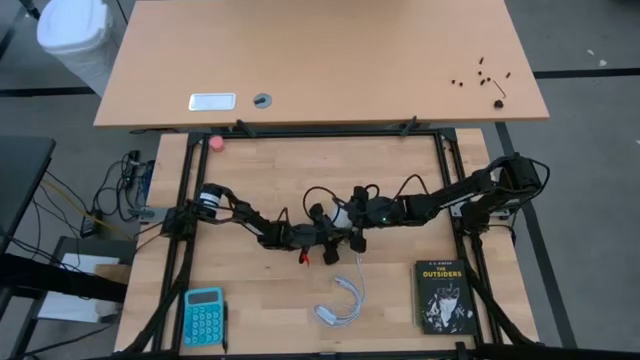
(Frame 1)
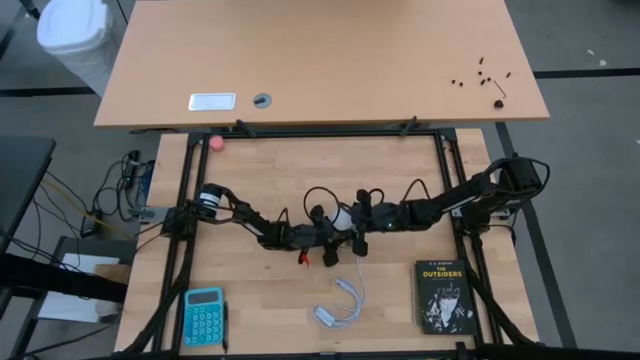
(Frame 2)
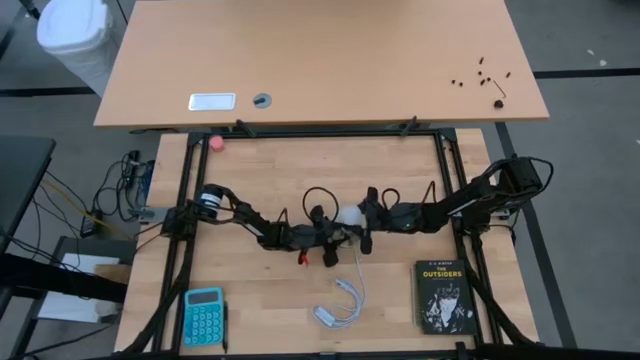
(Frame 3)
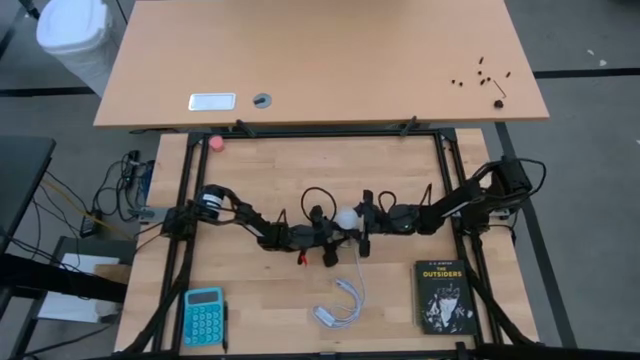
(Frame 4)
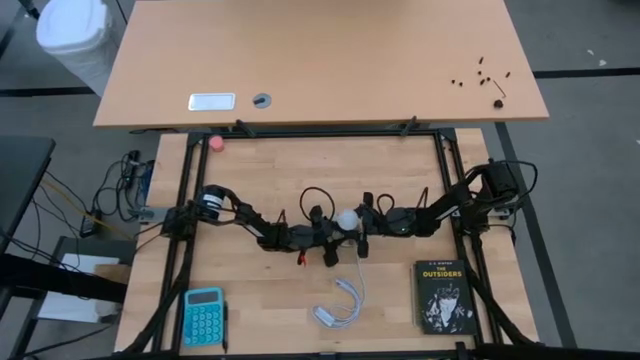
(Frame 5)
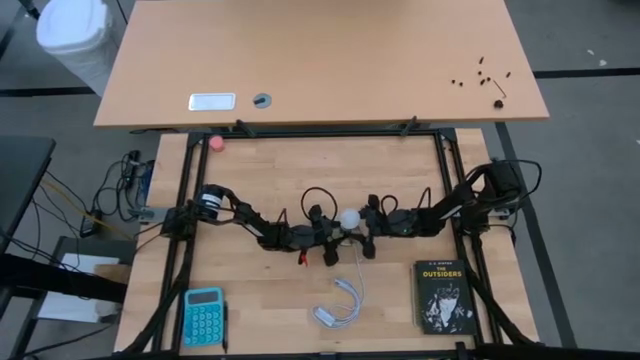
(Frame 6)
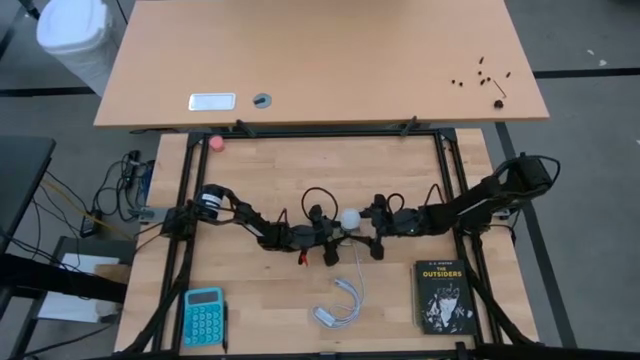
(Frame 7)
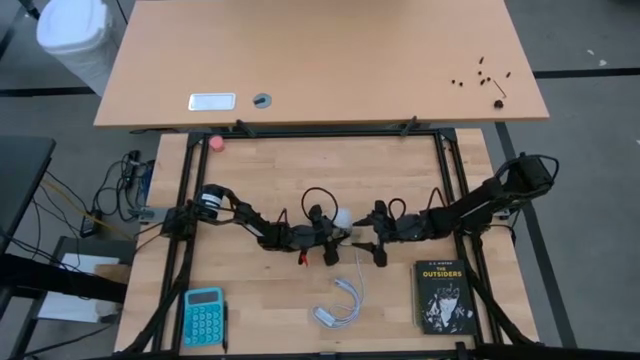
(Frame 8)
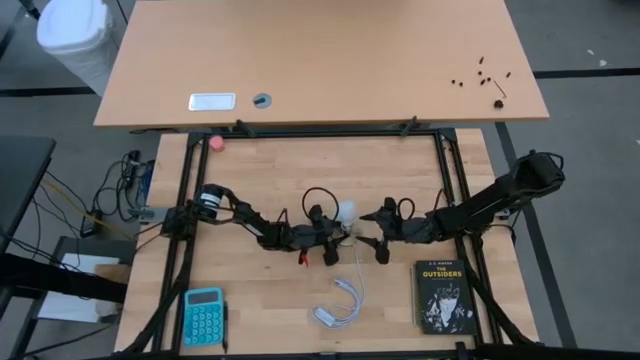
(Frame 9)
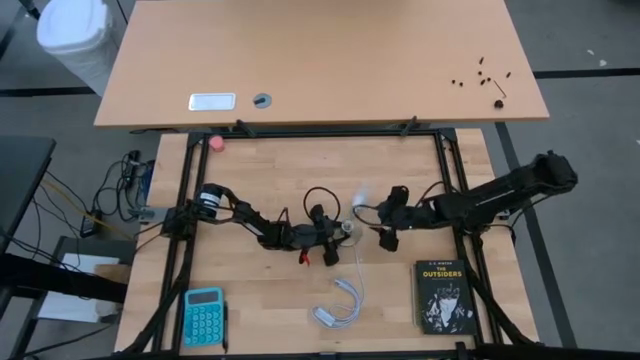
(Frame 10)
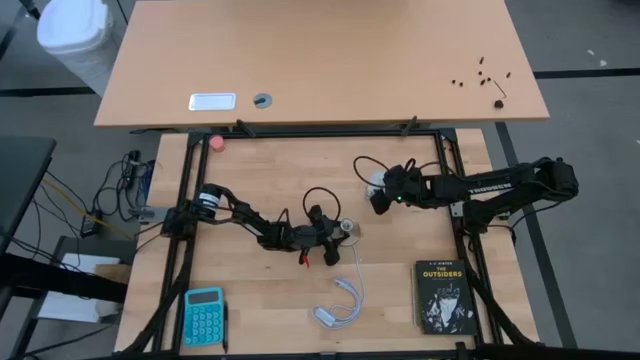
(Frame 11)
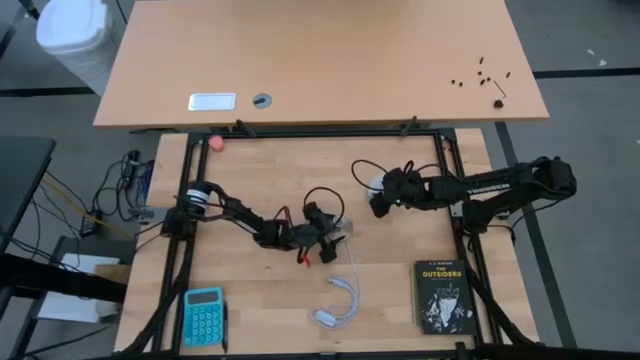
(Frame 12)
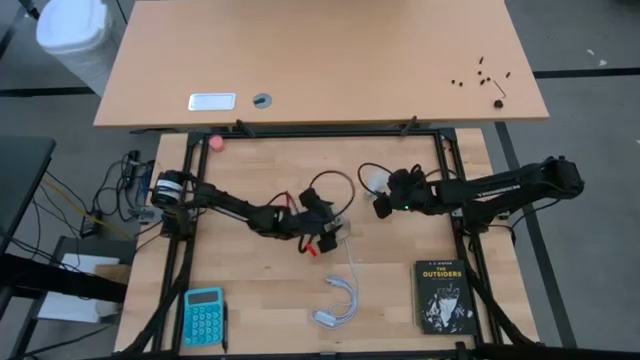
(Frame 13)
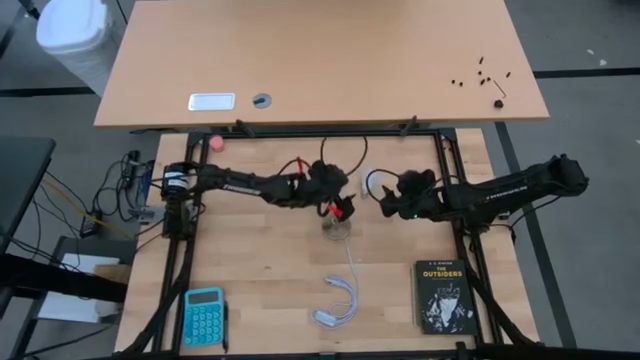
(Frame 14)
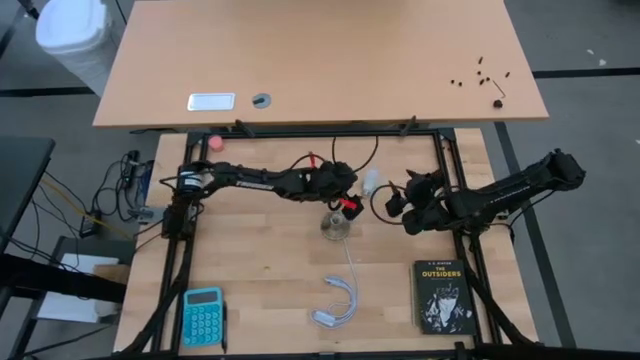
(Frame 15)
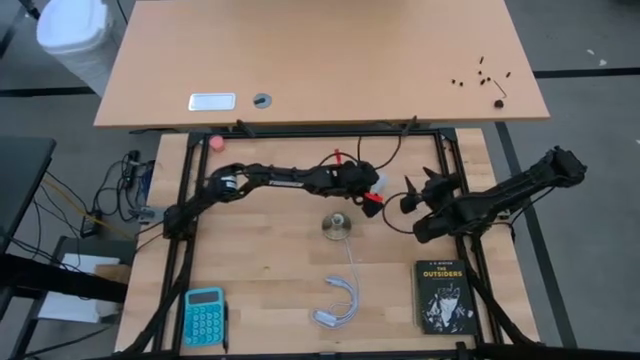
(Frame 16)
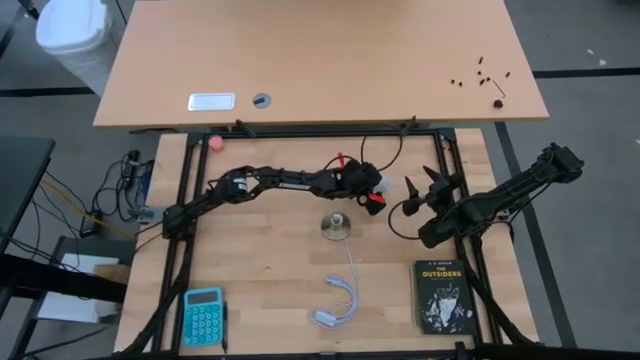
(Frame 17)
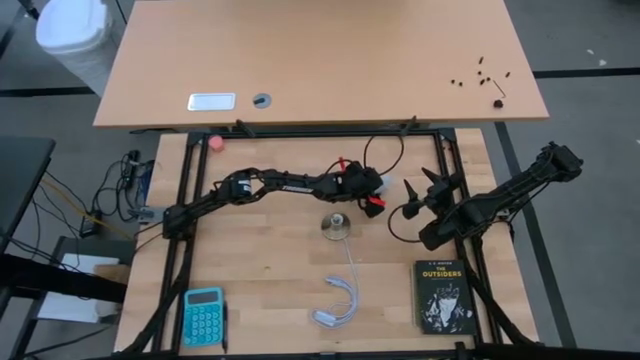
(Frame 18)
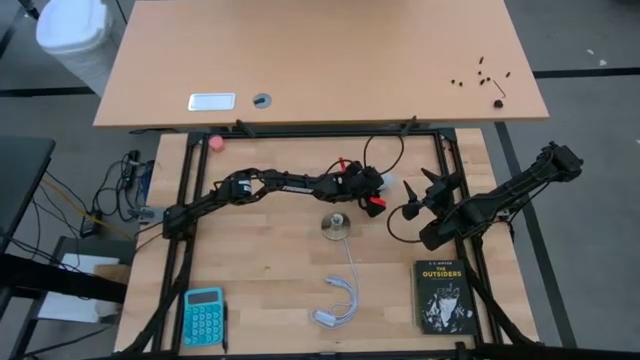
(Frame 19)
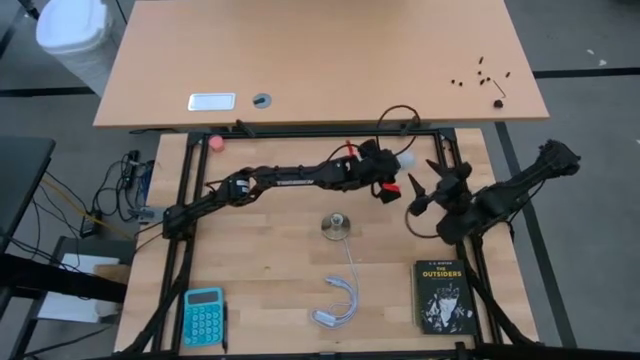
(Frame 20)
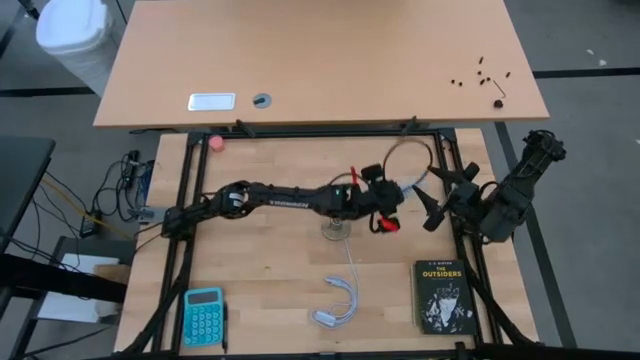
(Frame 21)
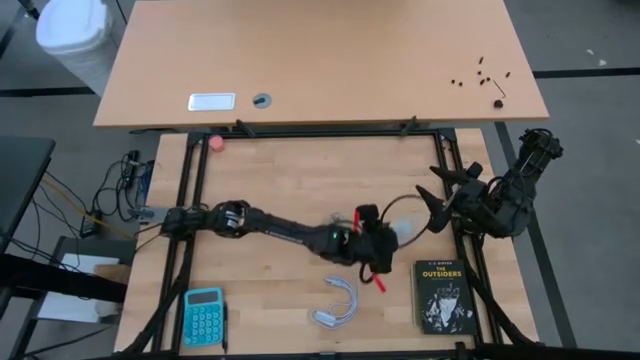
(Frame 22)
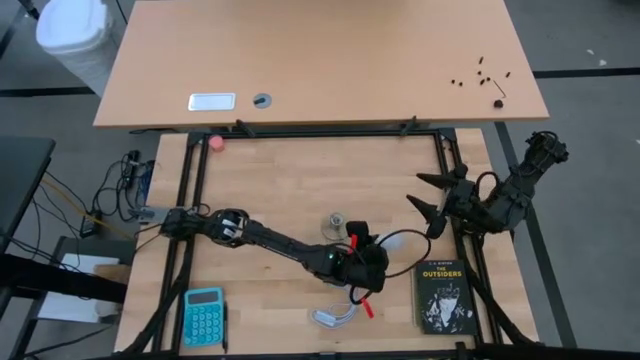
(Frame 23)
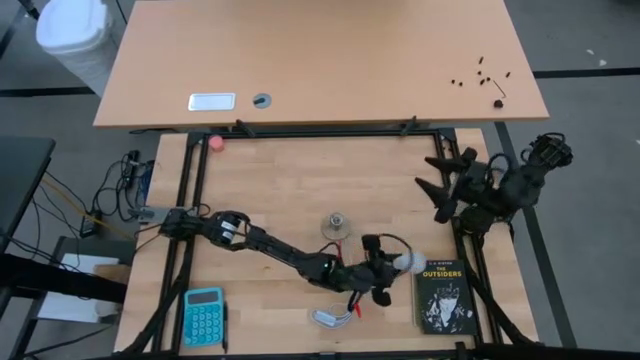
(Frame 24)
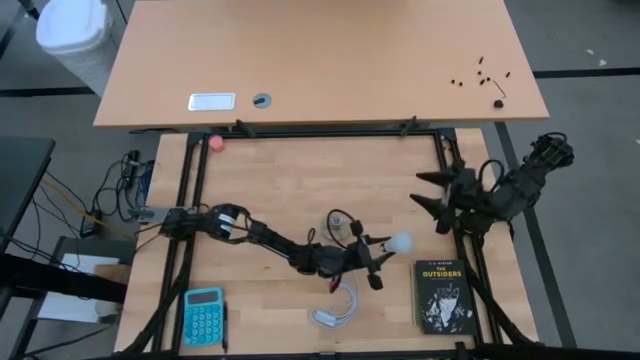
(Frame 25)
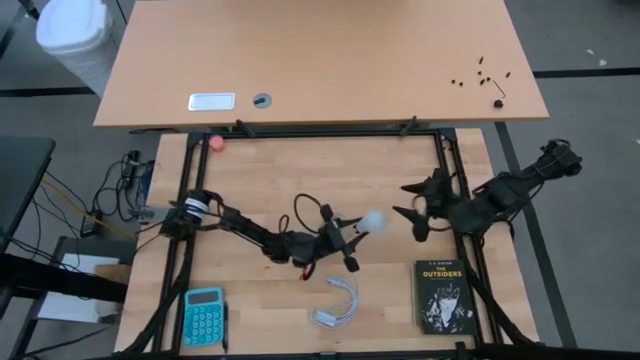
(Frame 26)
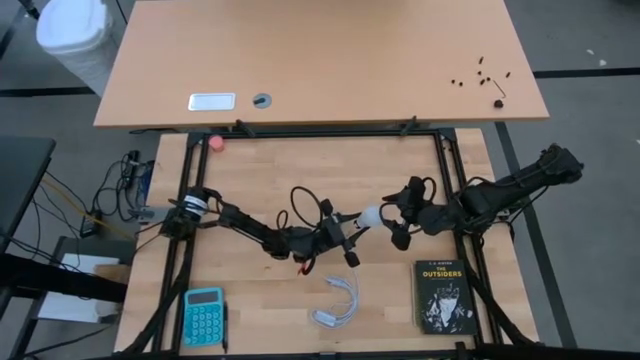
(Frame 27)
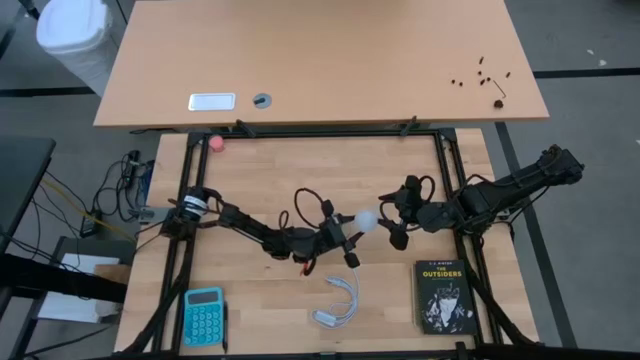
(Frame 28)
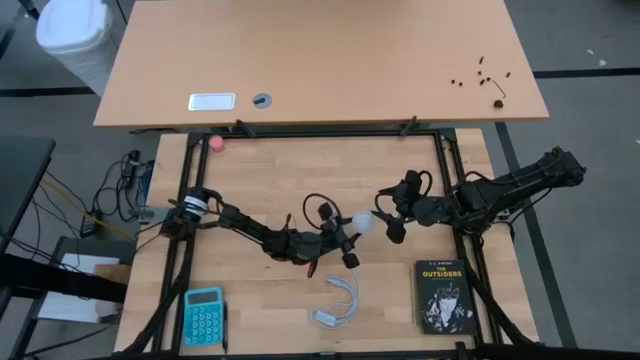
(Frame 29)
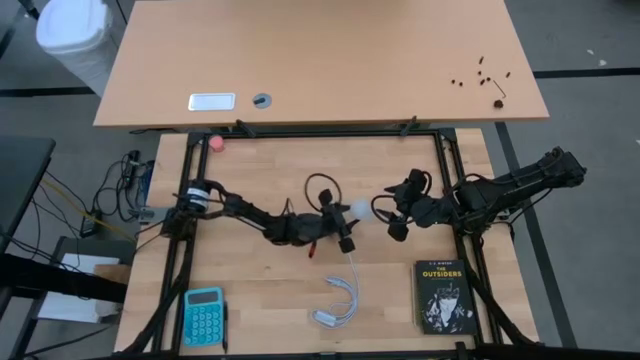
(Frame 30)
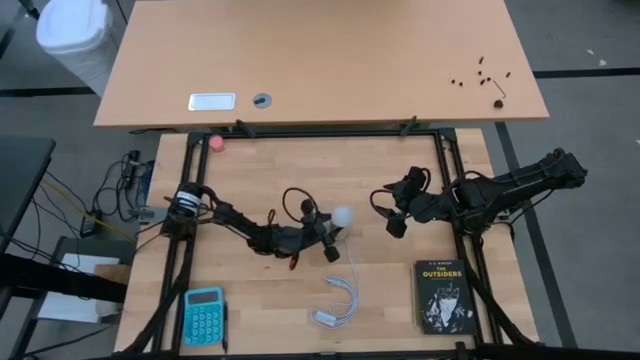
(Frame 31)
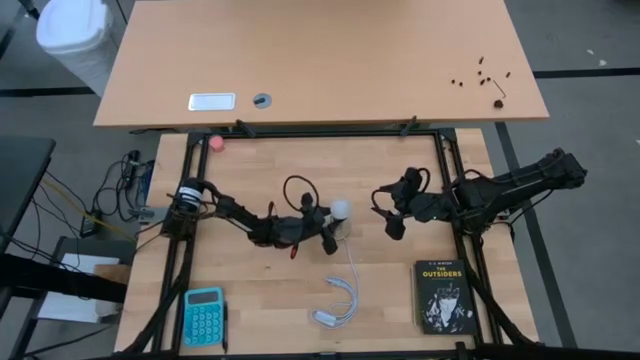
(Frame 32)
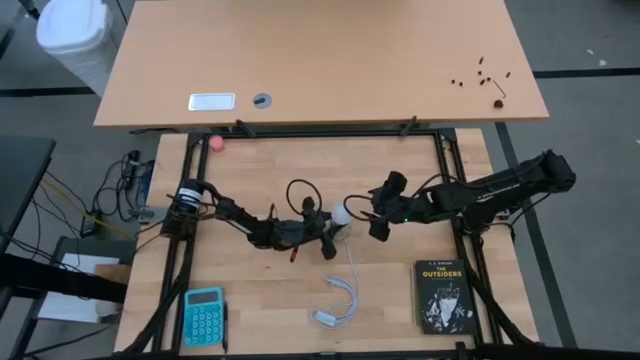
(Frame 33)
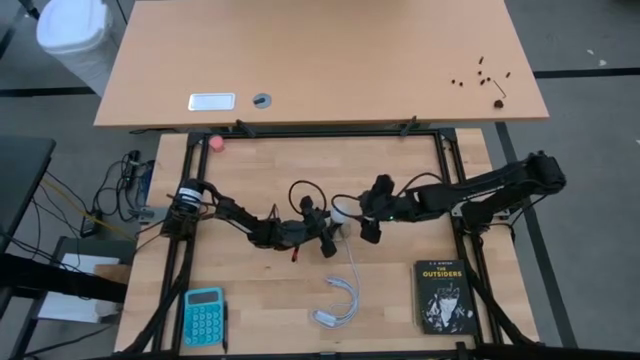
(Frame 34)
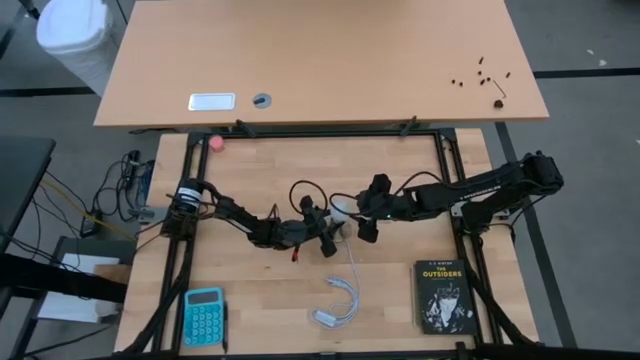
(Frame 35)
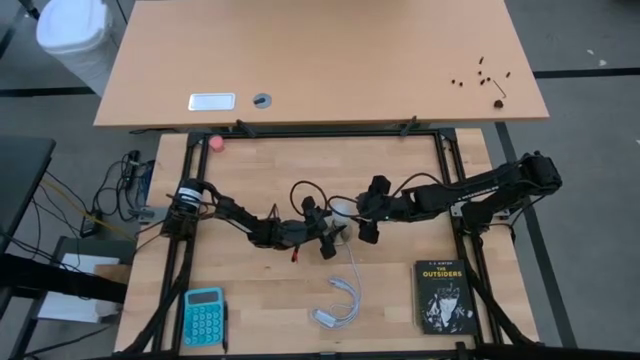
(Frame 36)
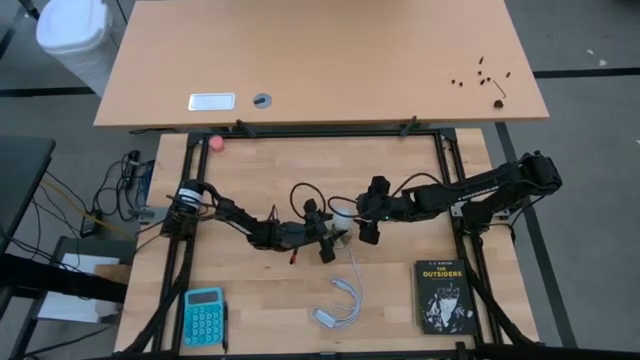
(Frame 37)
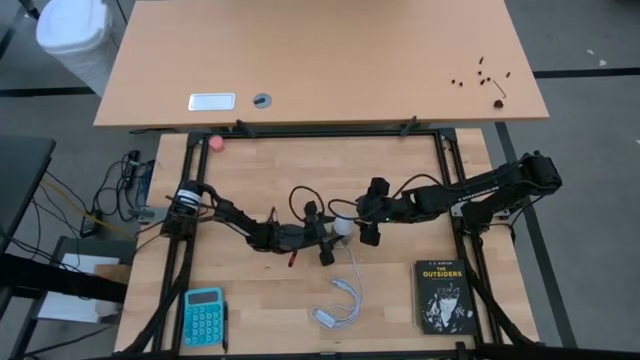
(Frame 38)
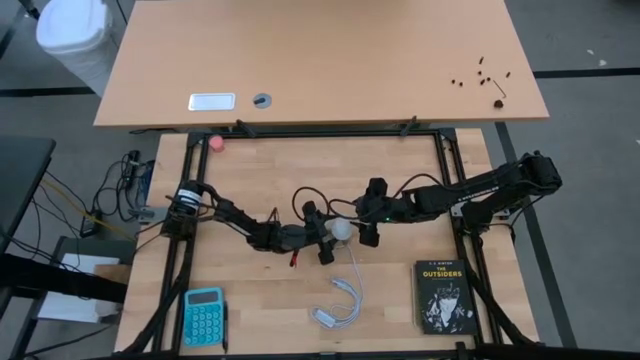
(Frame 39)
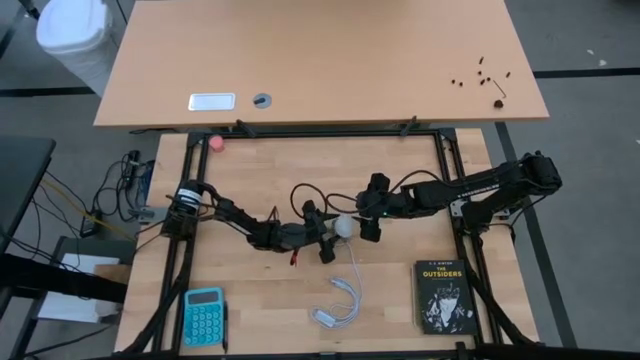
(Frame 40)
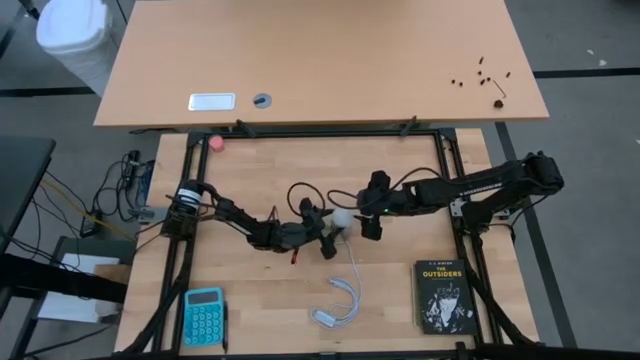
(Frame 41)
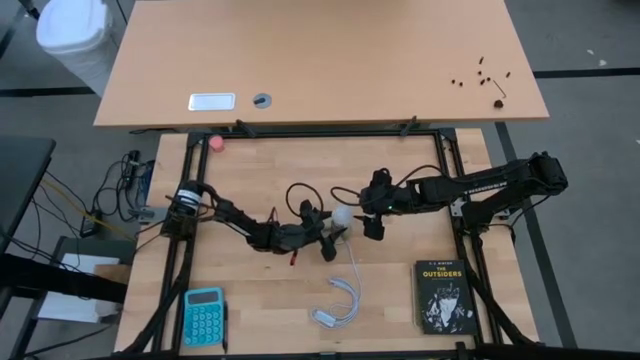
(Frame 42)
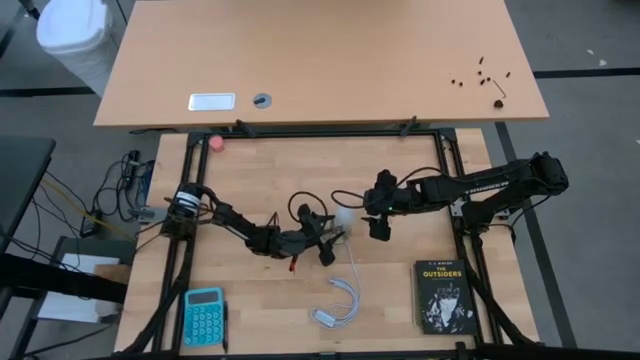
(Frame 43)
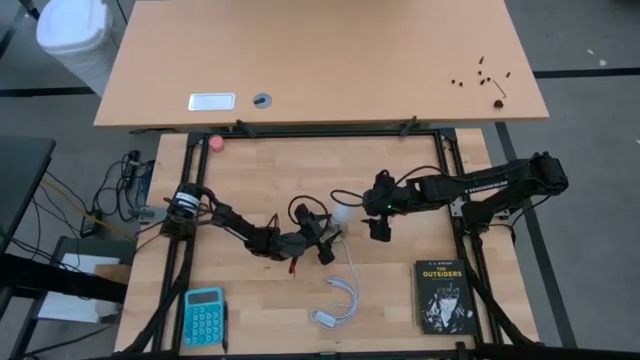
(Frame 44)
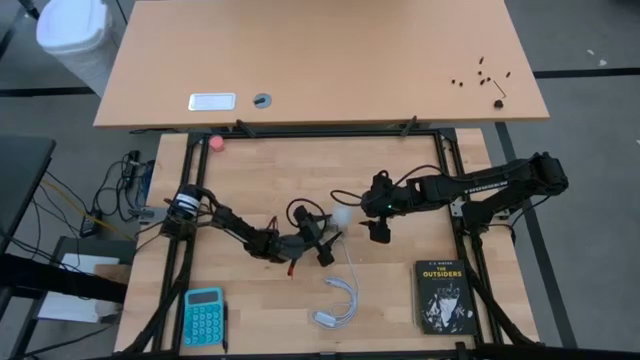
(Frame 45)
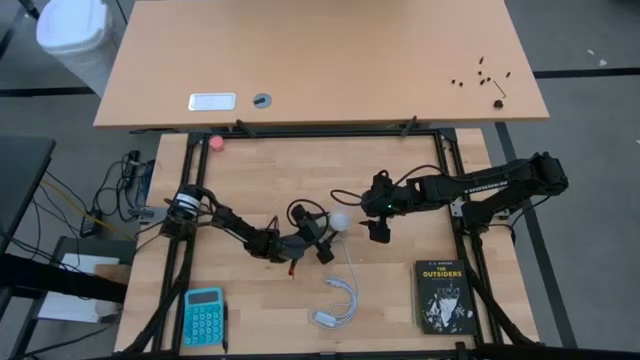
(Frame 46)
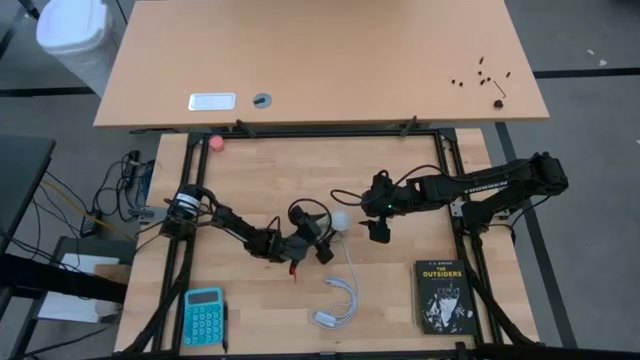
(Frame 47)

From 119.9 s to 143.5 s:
Task: Screw lightbulb
Insert the white lightbulb into the silver lamp
